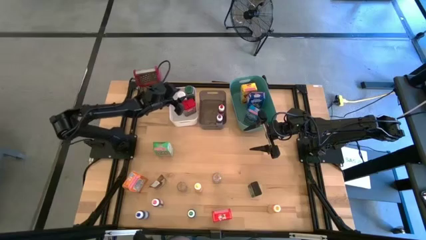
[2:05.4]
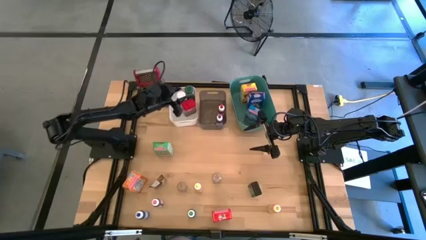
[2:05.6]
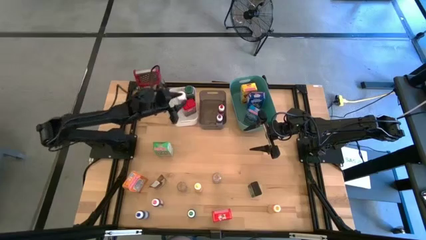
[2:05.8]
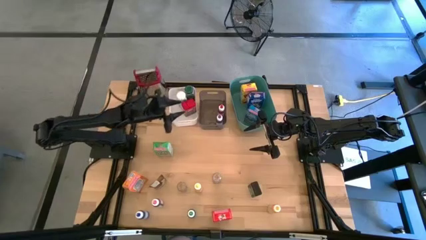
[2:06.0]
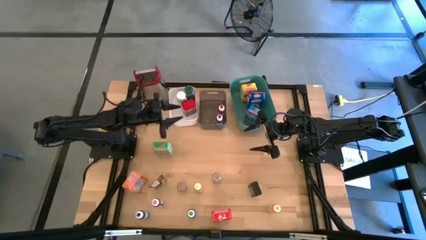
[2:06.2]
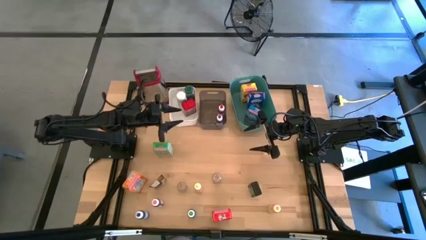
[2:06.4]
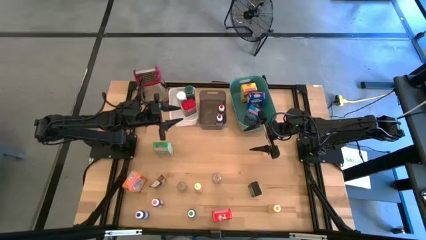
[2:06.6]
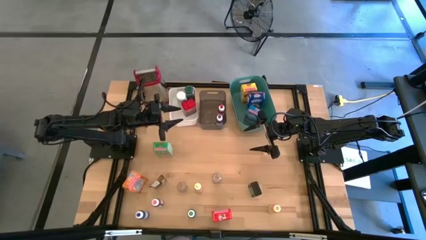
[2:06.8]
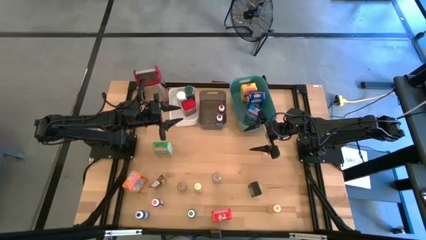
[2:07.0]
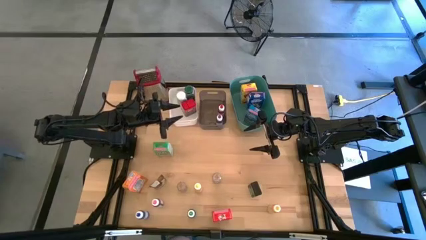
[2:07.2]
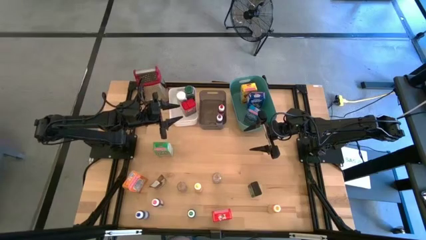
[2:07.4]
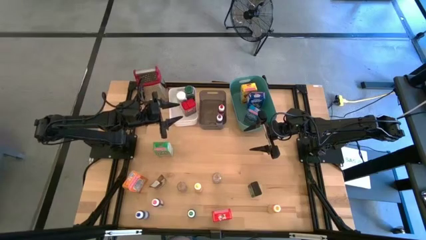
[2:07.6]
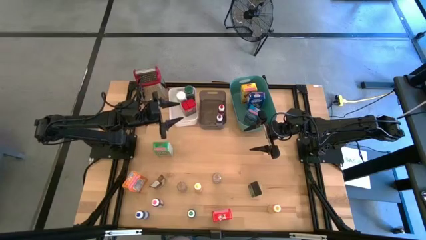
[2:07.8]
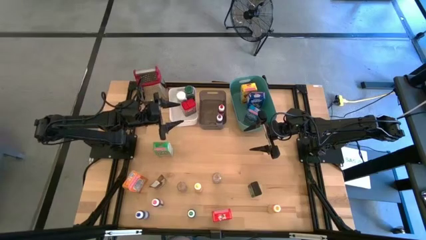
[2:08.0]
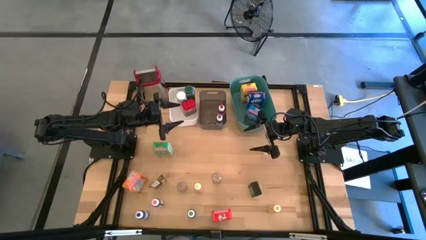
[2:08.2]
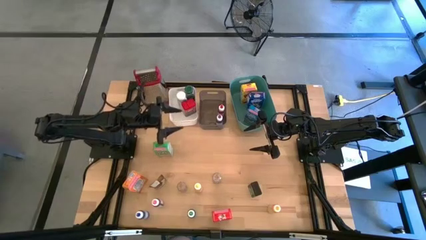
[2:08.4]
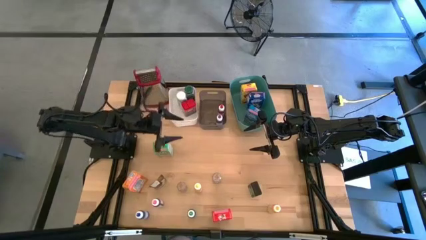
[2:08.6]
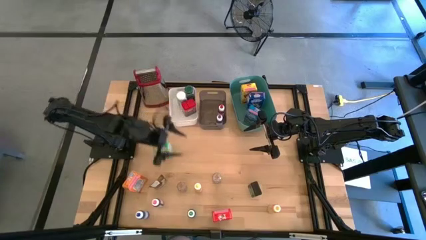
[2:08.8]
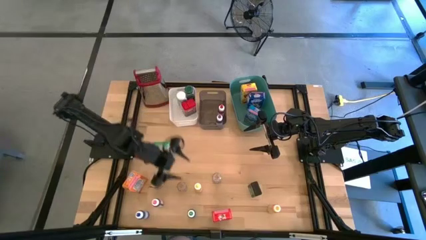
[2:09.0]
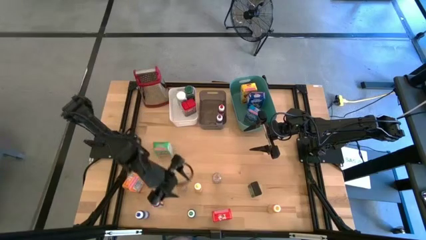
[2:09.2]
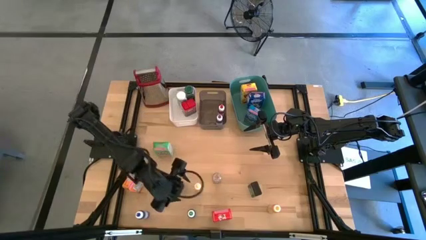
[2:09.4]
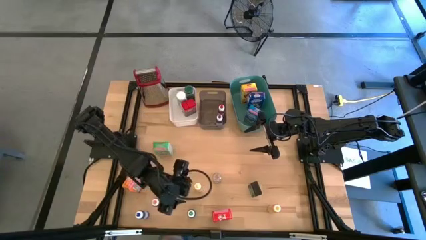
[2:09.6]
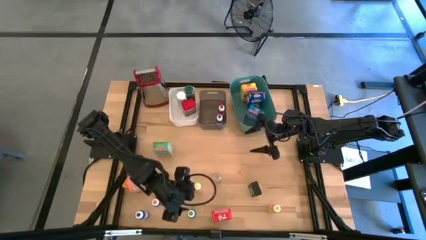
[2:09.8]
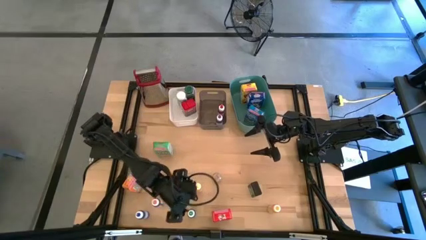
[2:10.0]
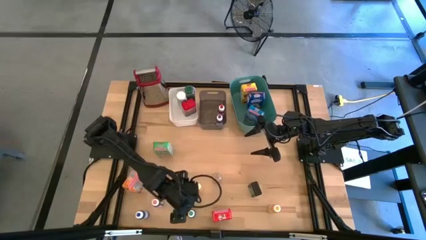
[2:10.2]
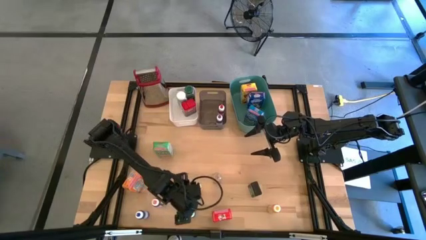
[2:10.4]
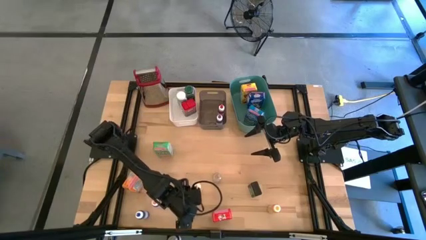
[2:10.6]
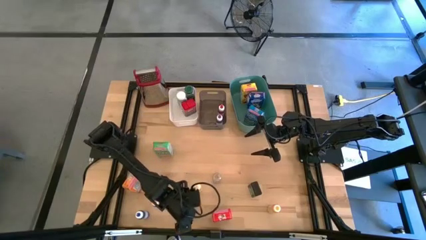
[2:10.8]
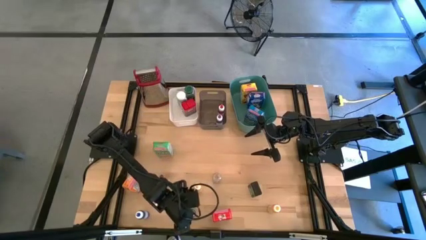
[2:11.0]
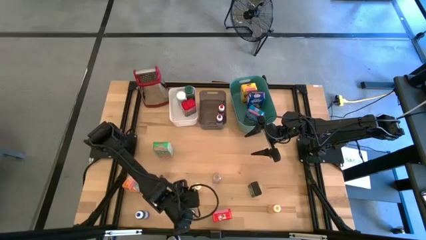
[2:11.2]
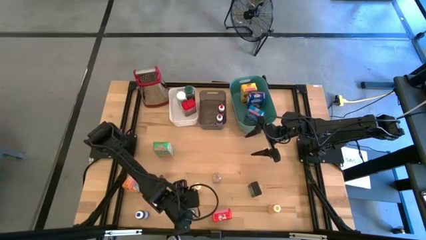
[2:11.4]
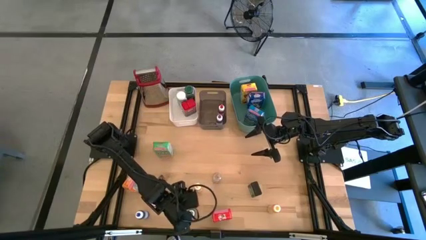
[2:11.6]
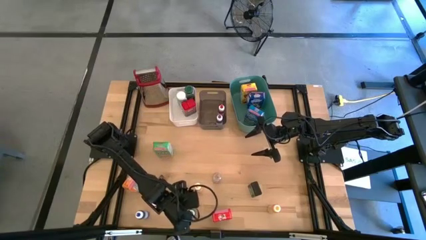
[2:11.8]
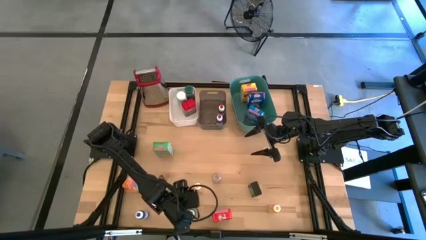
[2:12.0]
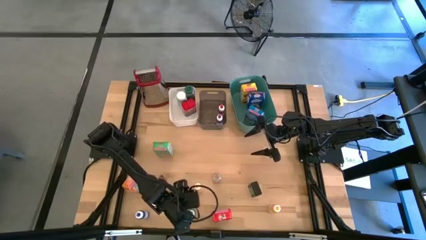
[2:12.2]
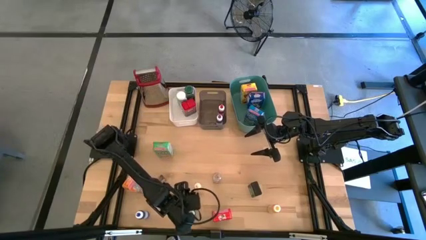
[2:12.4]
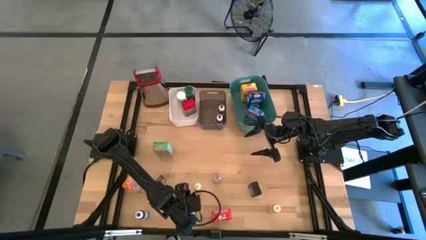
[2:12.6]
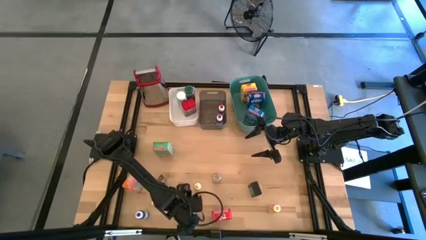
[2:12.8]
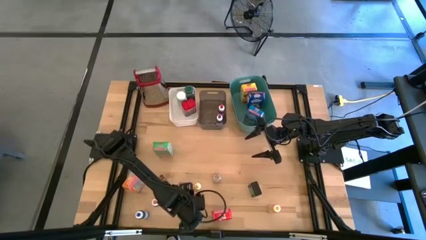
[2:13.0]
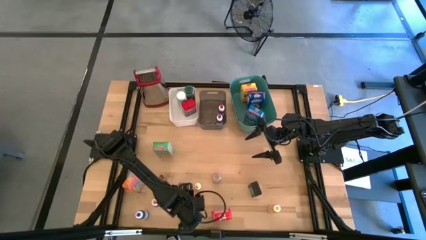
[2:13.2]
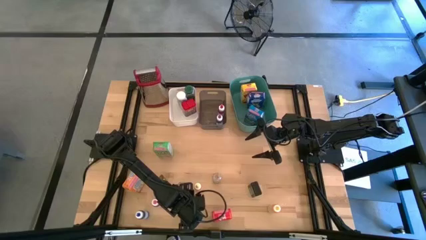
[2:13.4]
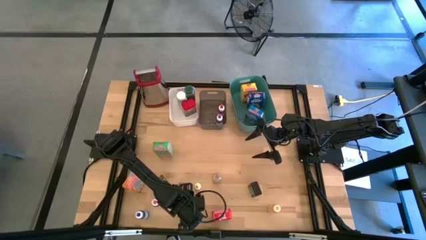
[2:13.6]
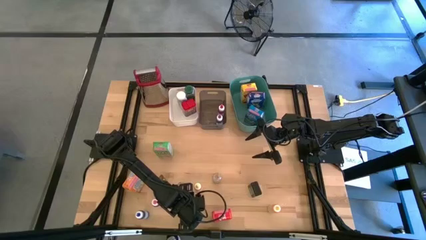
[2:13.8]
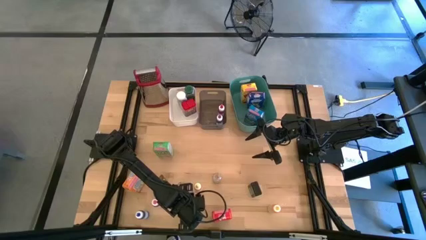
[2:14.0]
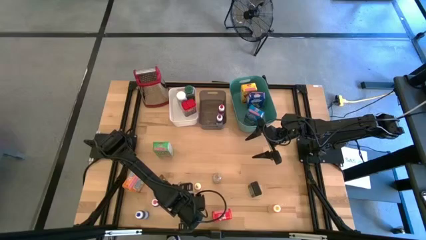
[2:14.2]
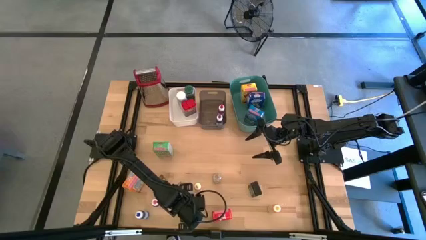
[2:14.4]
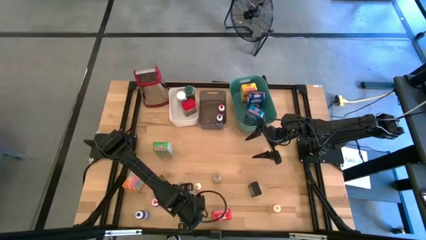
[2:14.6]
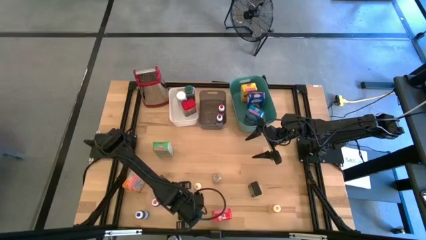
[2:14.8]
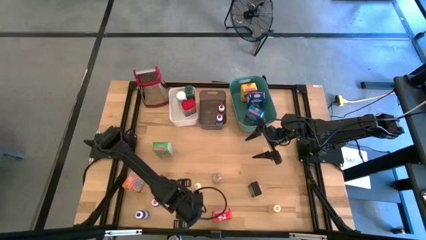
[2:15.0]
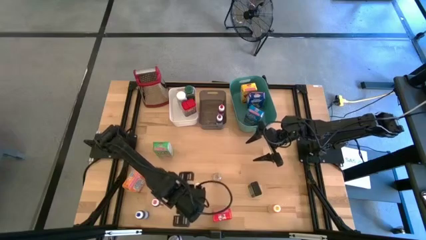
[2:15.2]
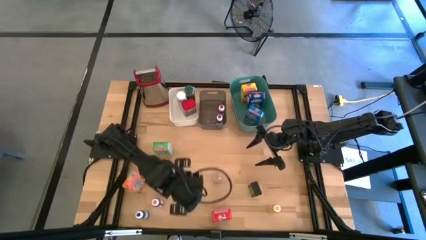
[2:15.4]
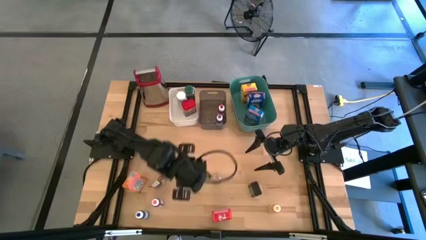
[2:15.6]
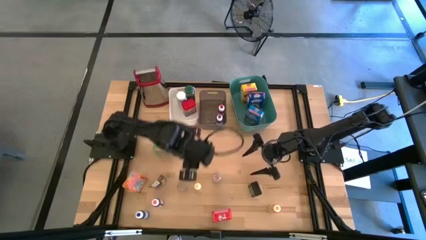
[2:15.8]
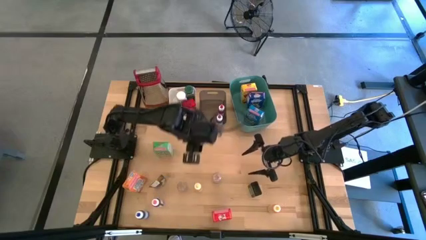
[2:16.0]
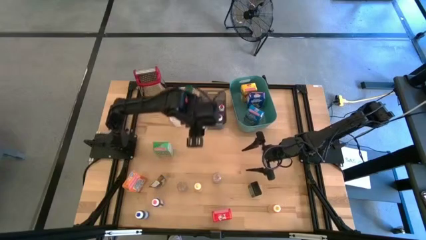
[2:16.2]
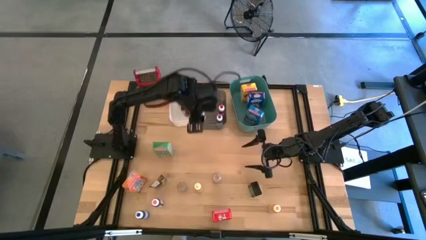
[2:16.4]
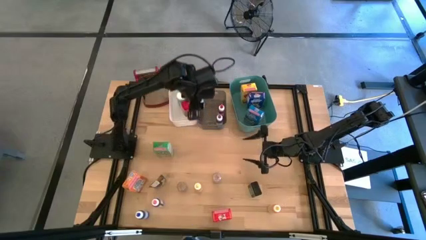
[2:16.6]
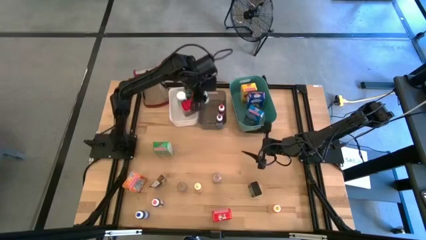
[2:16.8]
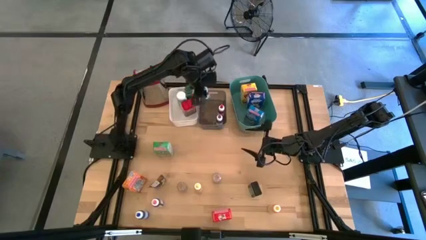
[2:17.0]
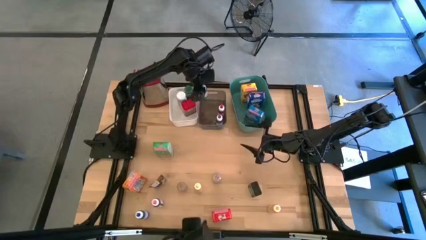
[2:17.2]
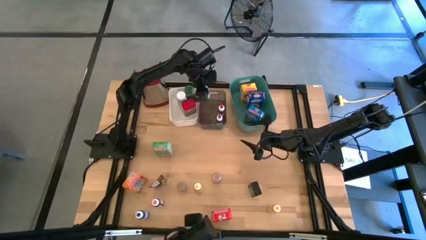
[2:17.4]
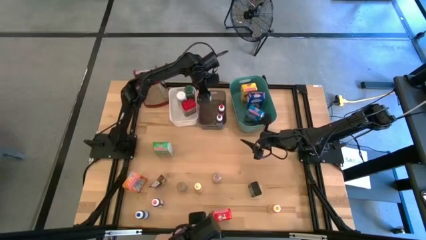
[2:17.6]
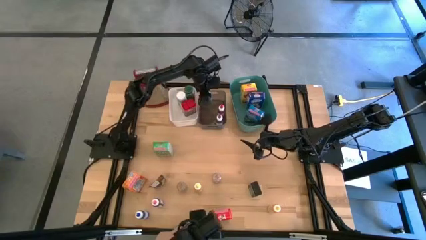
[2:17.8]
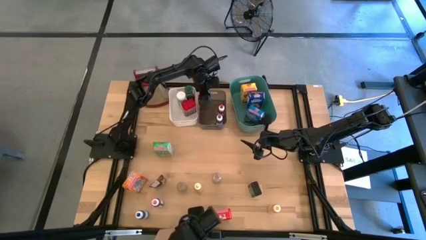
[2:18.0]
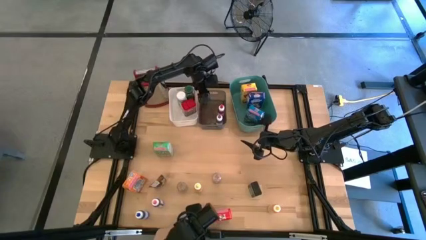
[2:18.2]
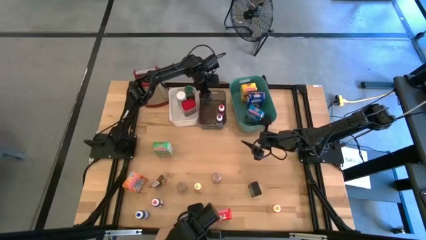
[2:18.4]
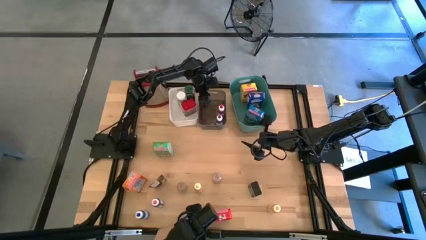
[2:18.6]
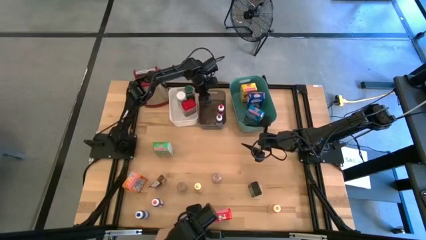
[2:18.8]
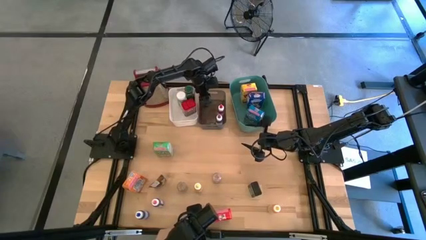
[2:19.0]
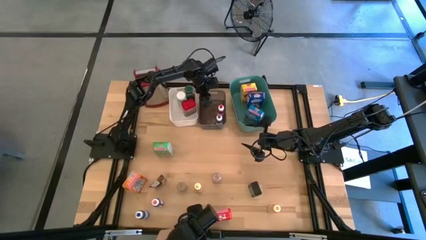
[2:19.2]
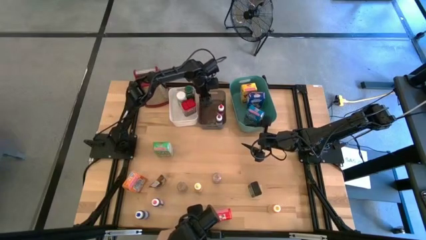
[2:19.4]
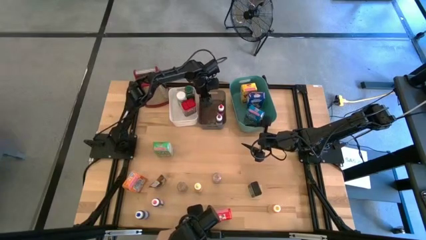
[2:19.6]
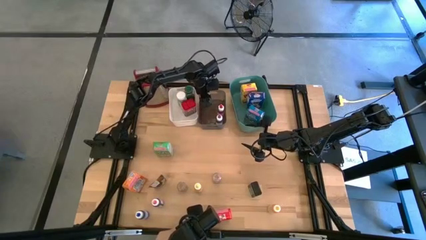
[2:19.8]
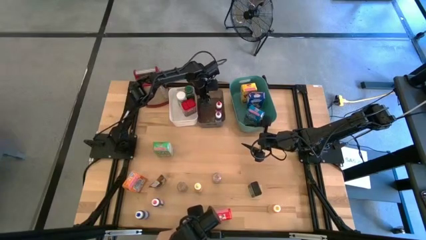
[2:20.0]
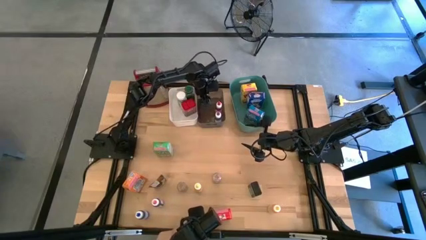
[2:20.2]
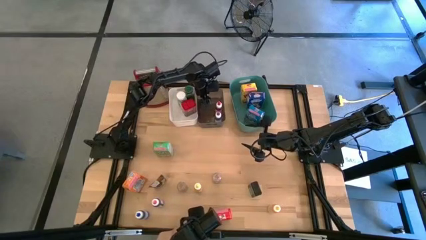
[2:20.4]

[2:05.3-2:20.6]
Task: Pick & Place Kitchen Items
Put the green food coloring bottle into the middle black transparent bin

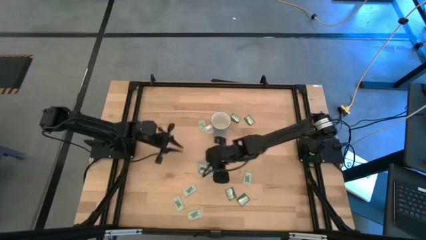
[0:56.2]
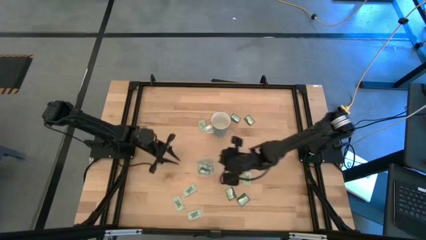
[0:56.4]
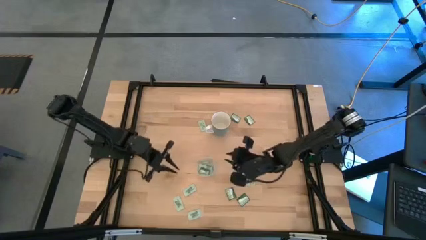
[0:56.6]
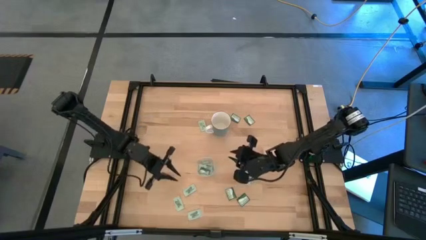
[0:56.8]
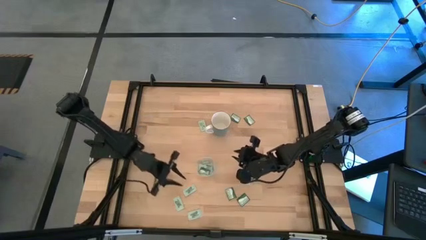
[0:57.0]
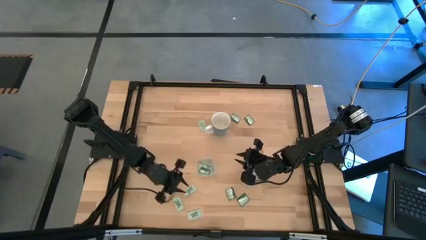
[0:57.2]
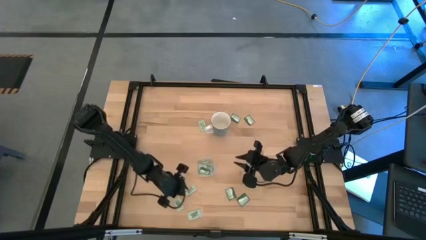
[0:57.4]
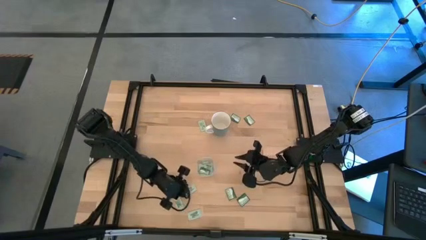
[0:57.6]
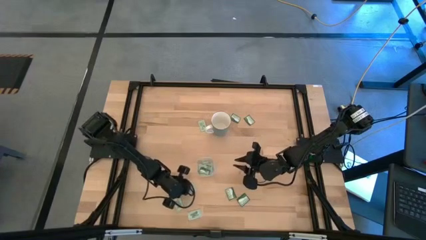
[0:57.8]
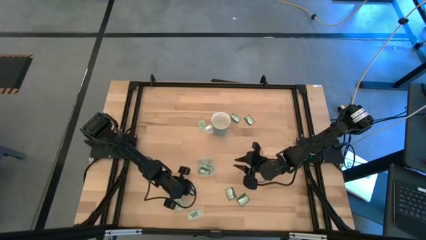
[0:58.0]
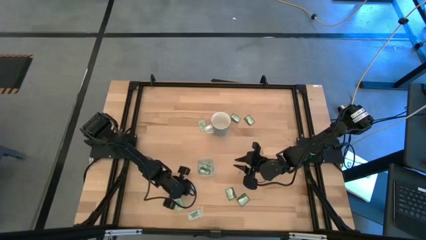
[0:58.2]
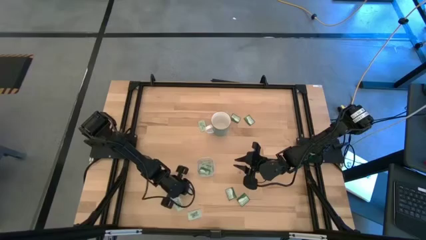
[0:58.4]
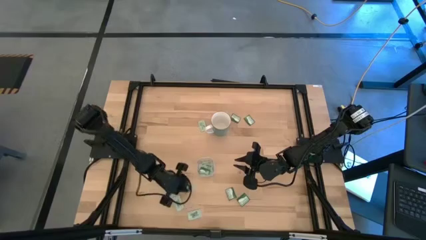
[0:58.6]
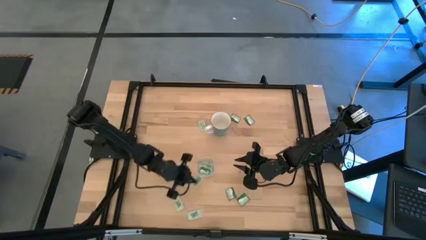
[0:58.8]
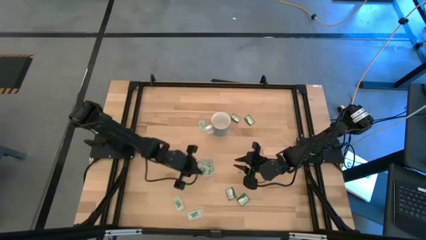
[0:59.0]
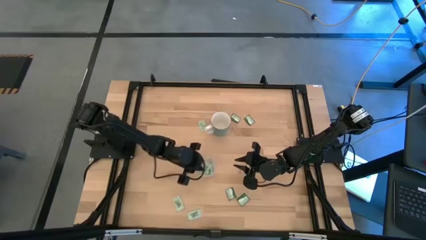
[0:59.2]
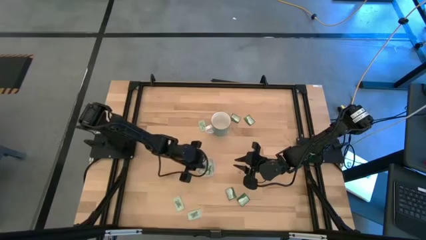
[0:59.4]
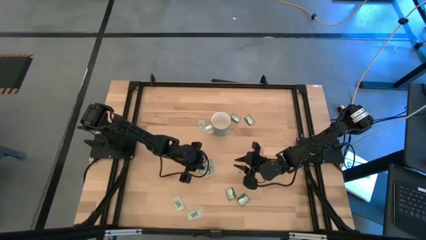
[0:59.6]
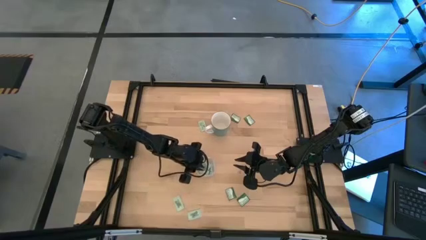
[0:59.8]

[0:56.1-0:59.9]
Task: Pick and place Stevia / Truvia into bins
Put the white stevia packet into the transparent bin
